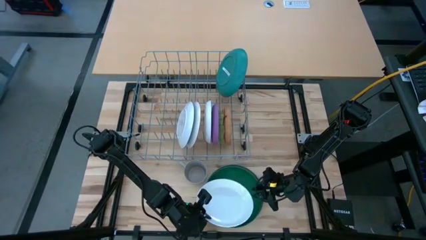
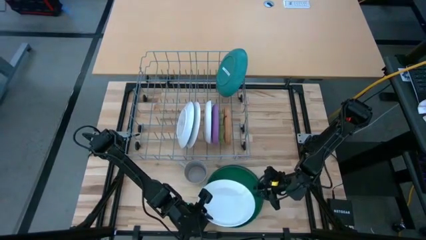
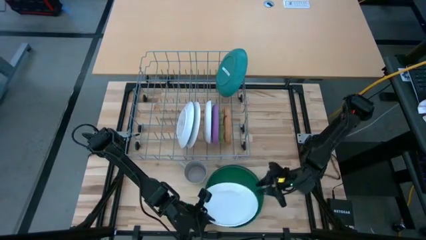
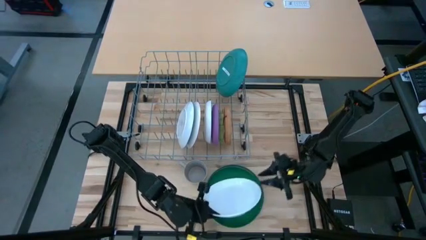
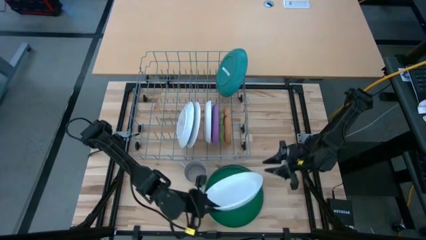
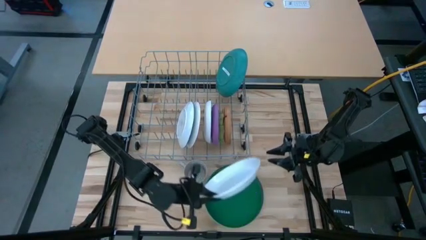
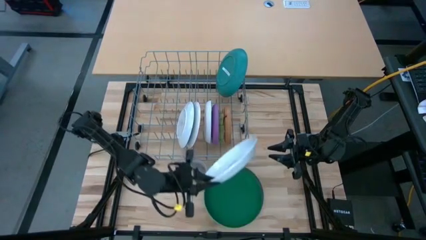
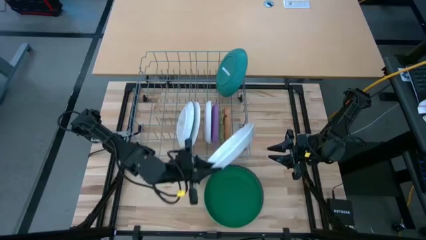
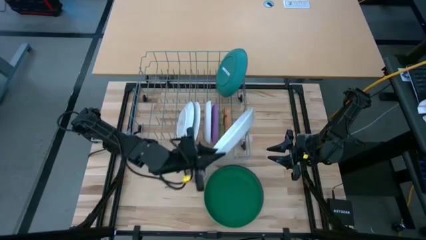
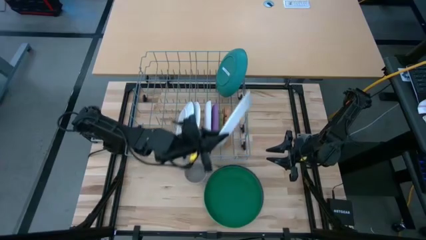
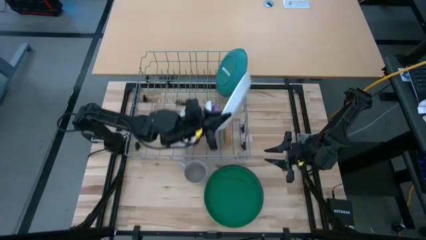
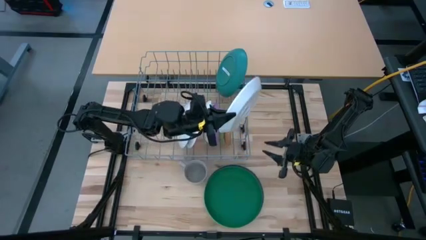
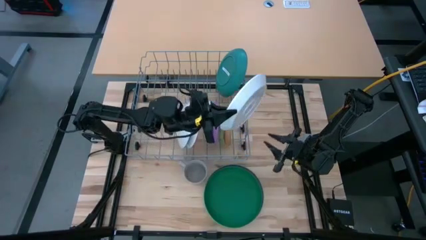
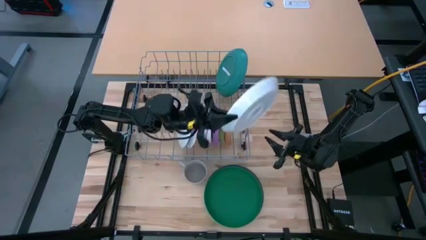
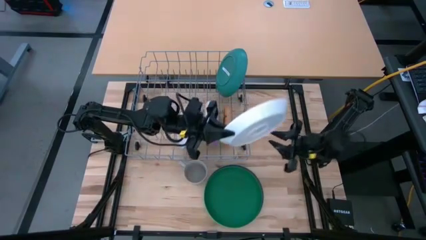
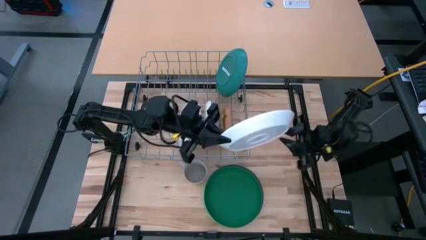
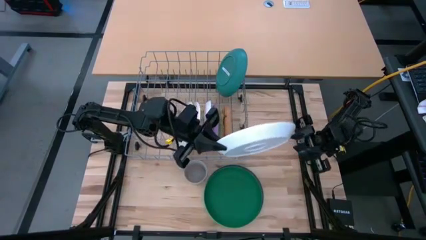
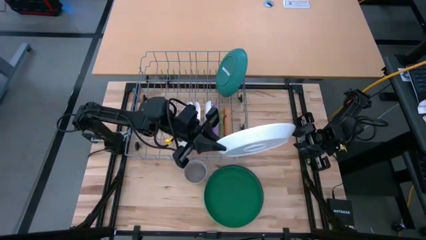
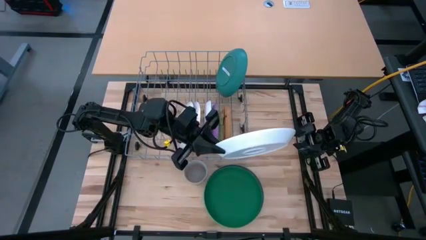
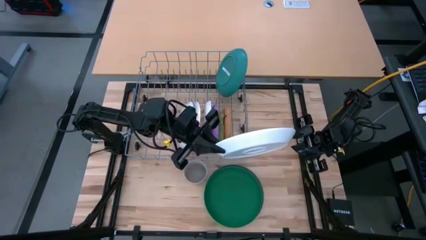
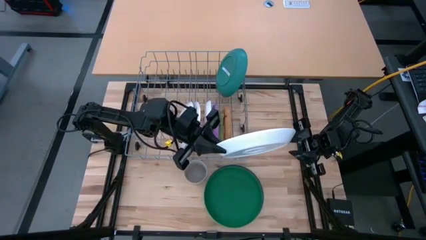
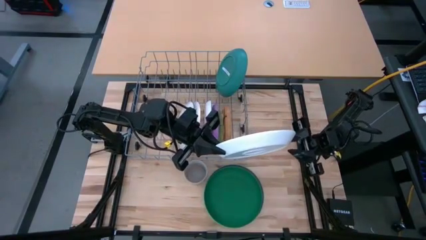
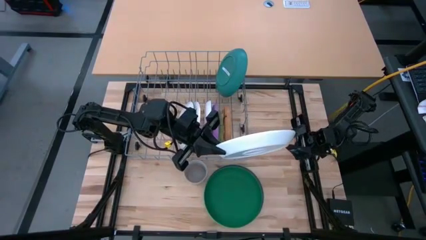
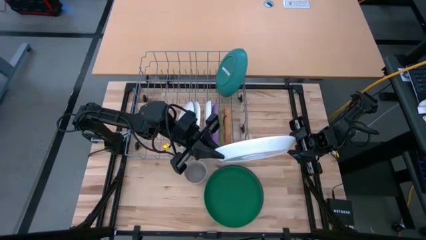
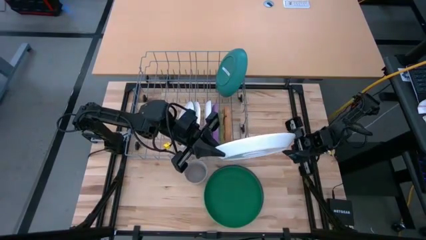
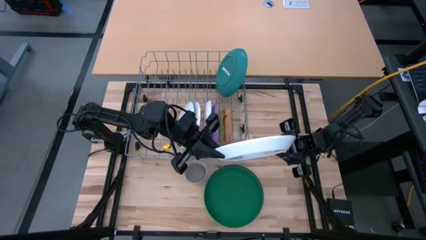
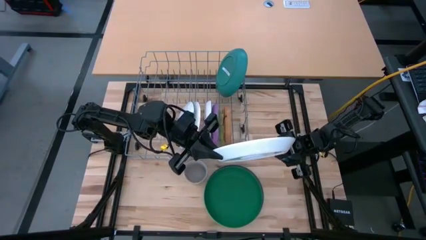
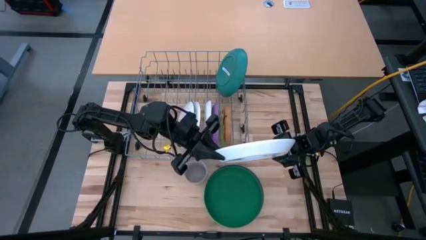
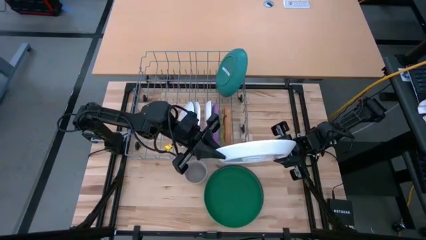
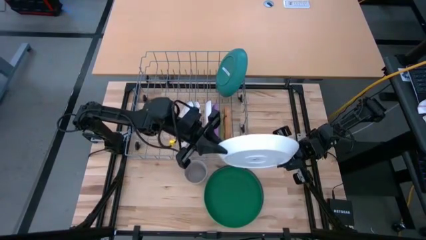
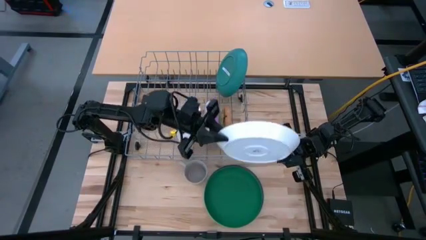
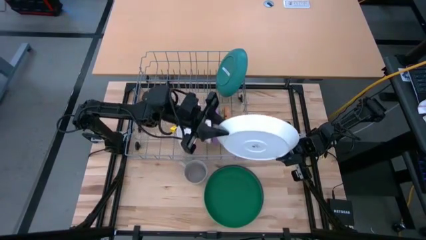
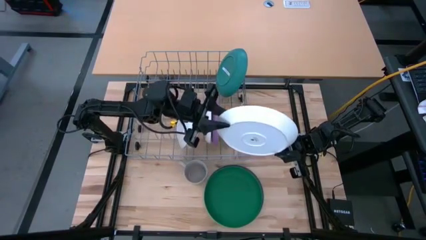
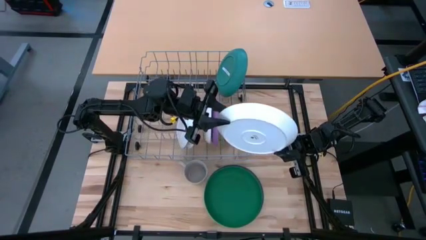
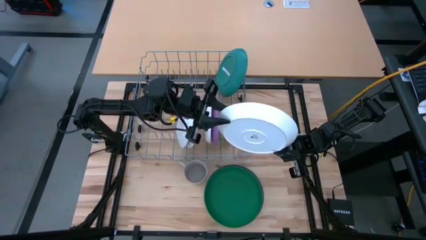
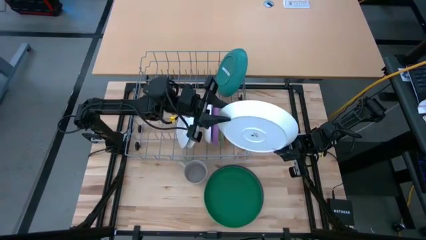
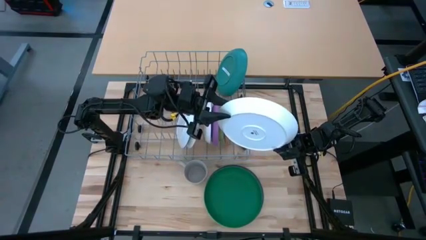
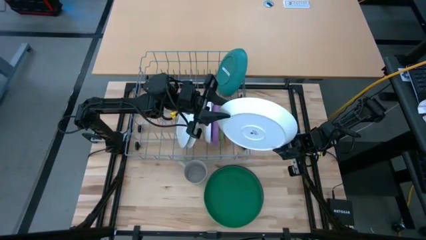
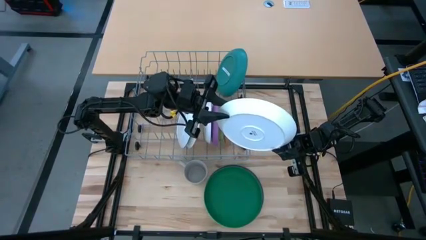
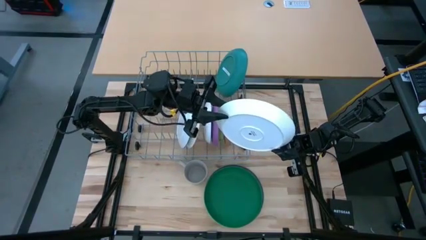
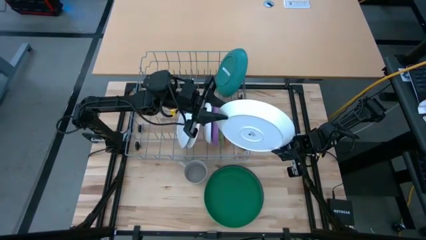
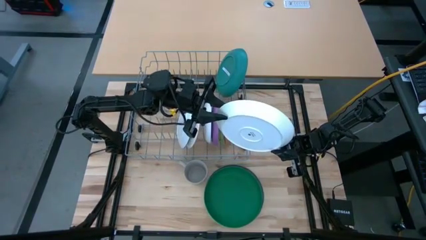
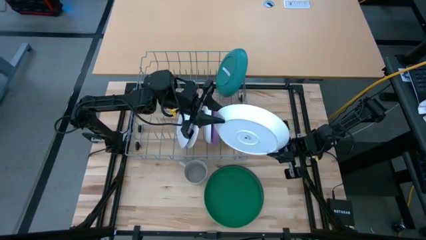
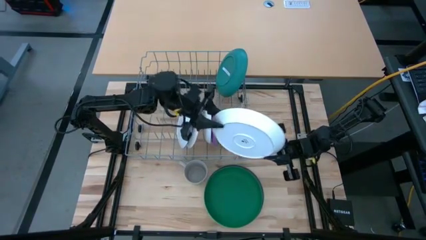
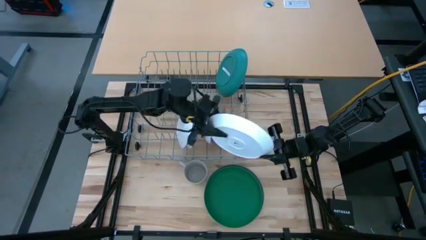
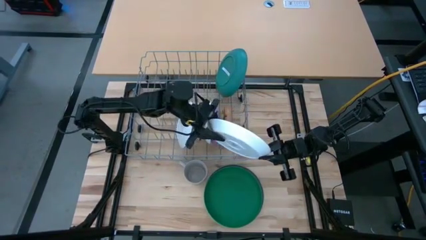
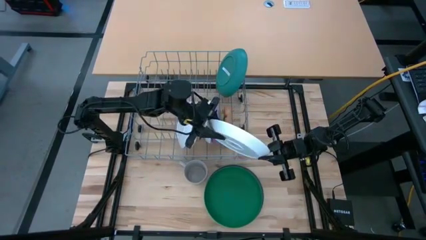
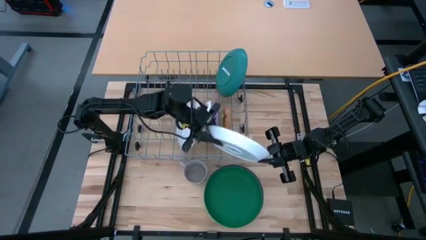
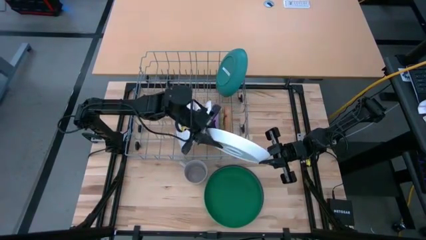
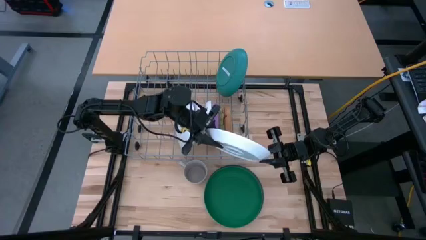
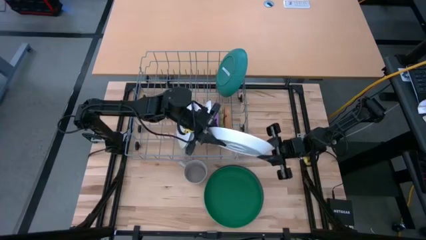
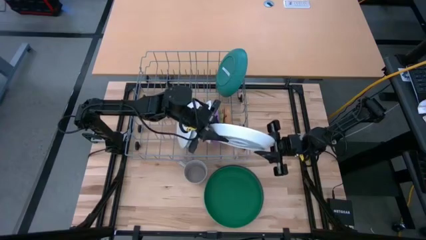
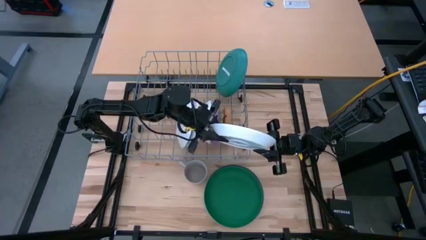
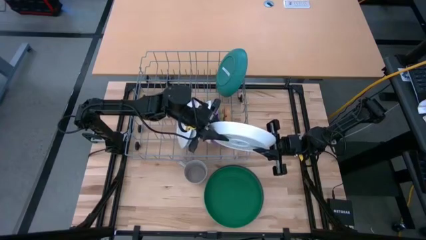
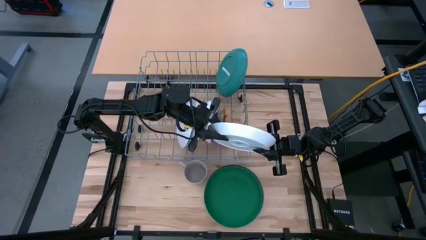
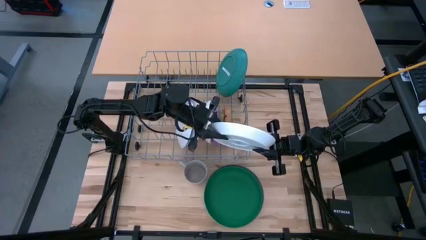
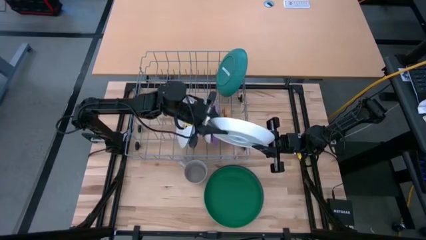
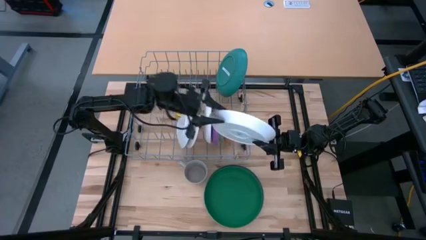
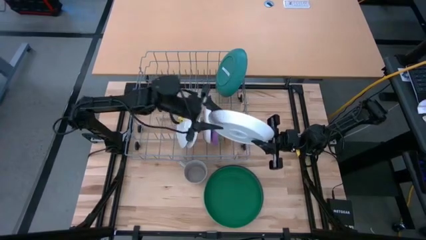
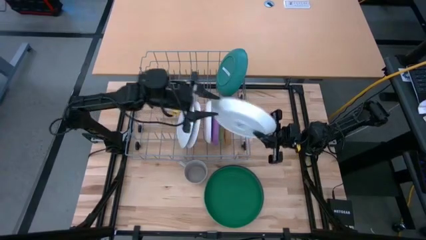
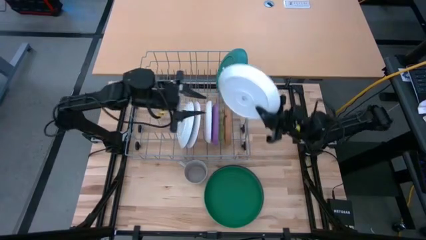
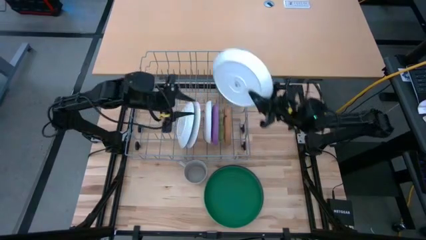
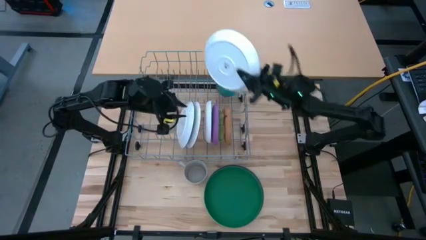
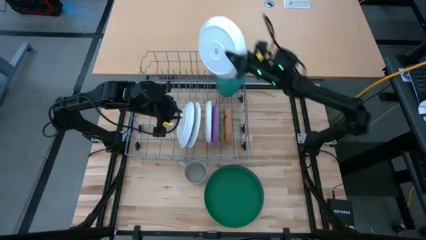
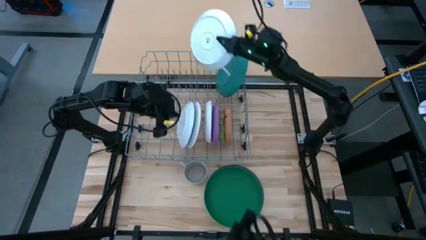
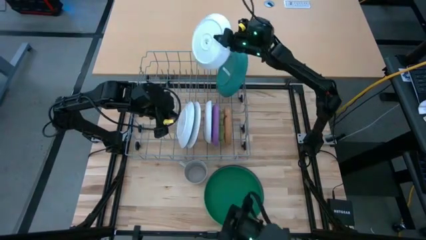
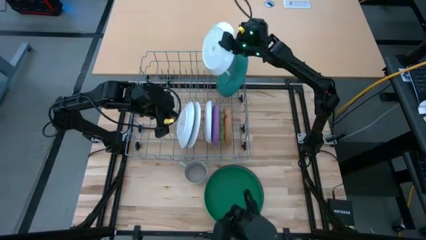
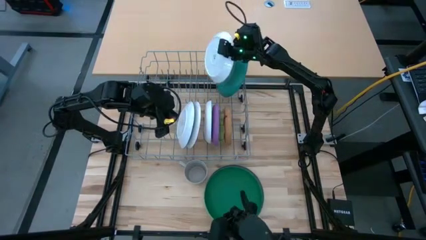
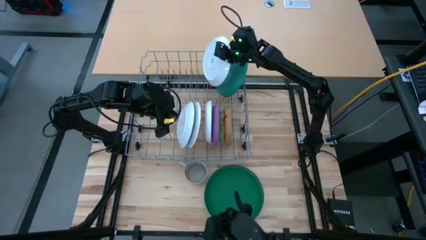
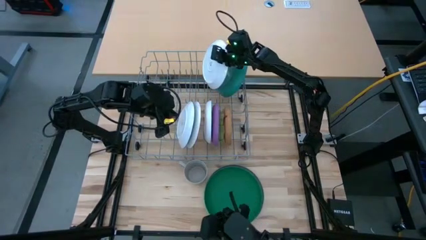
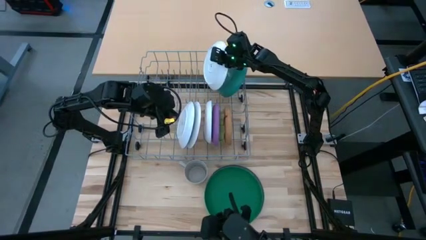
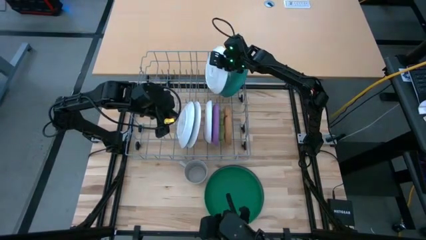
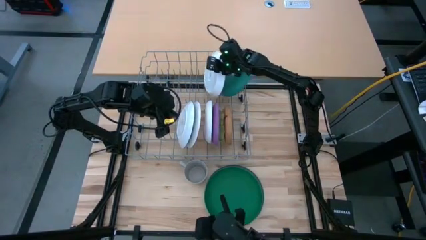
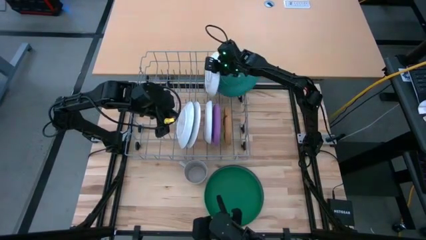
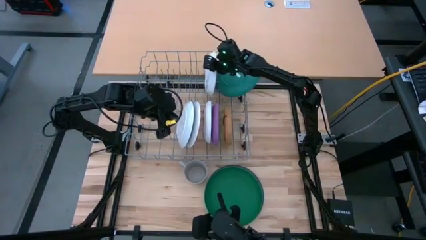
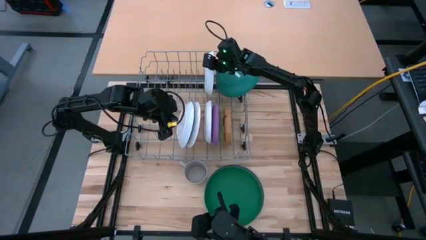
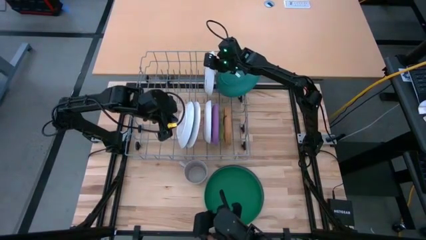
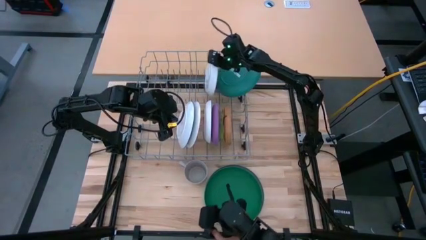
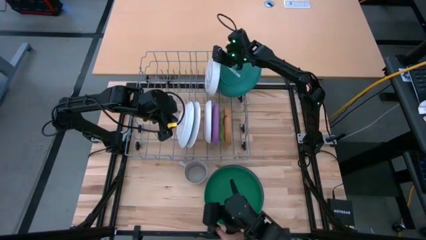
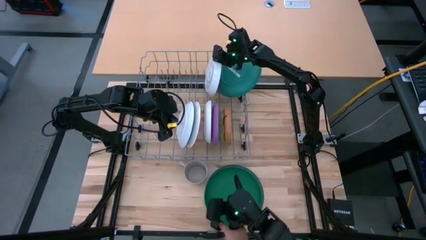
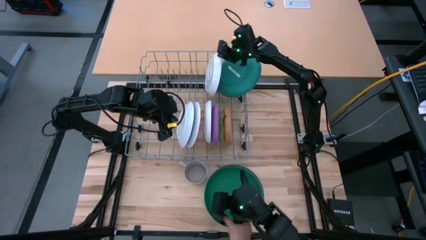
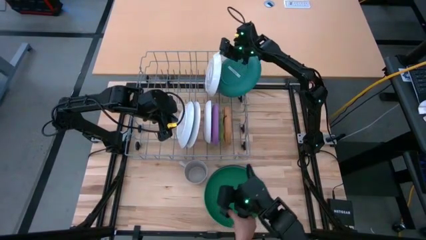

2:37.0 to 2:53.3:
Task: Sort dishes
Put the white plate in the dish rack
